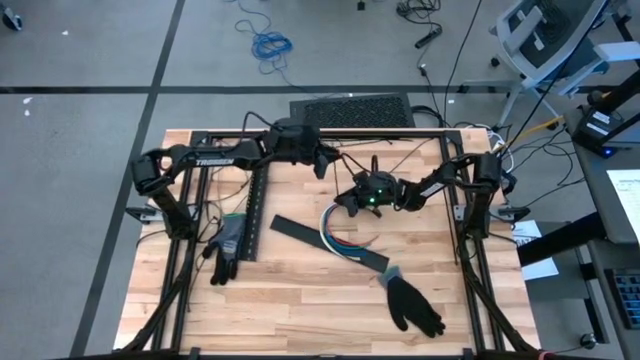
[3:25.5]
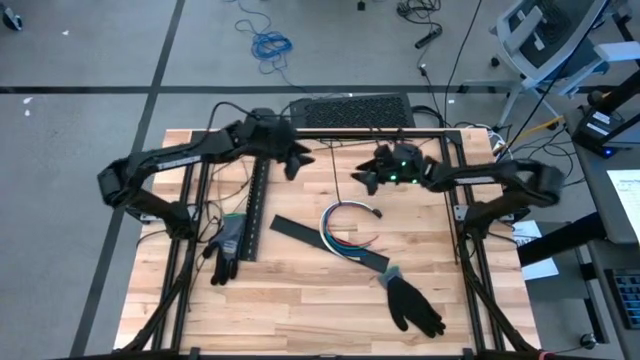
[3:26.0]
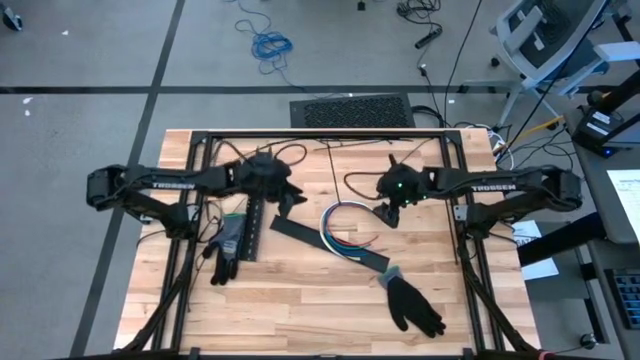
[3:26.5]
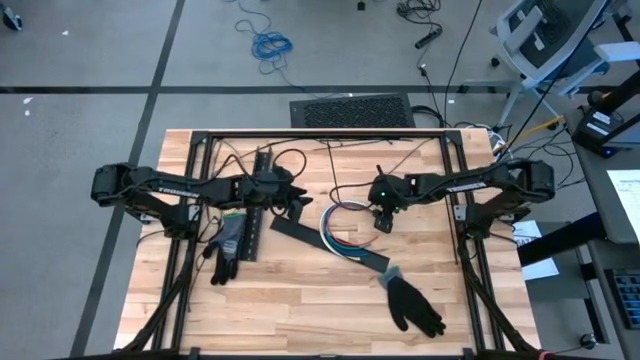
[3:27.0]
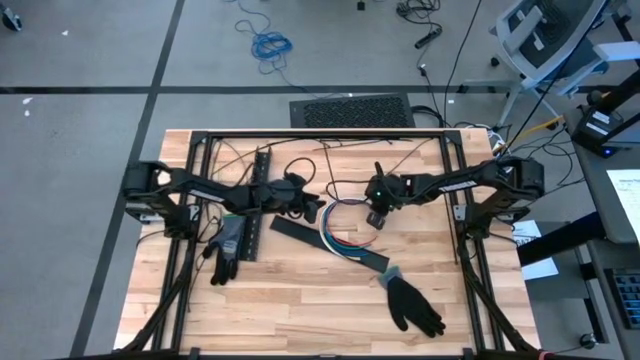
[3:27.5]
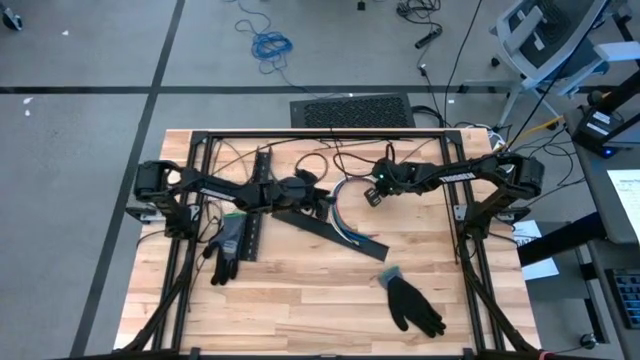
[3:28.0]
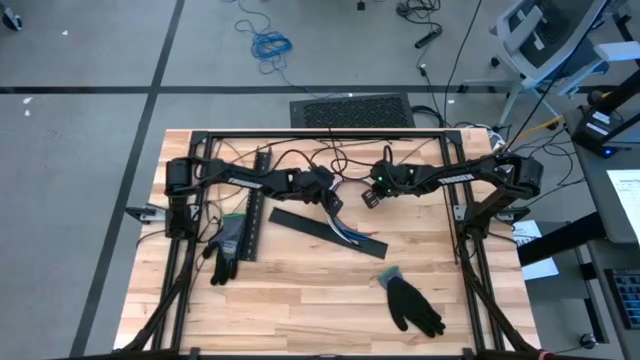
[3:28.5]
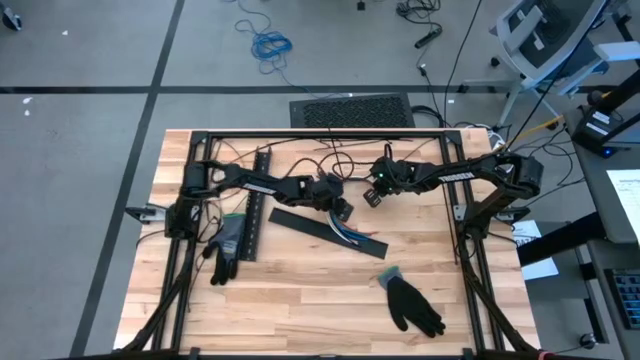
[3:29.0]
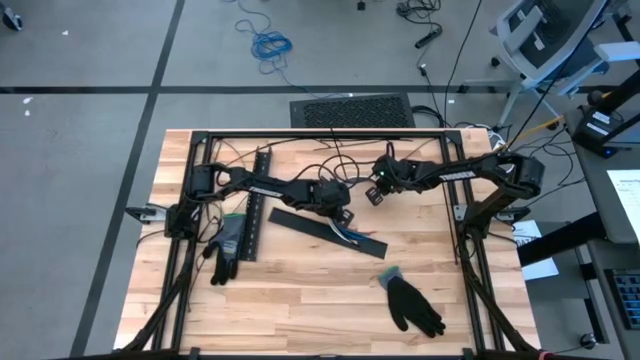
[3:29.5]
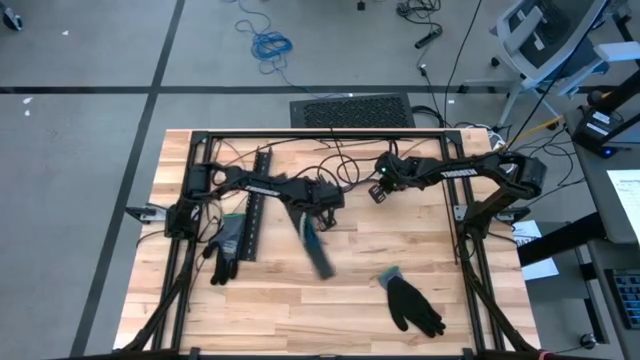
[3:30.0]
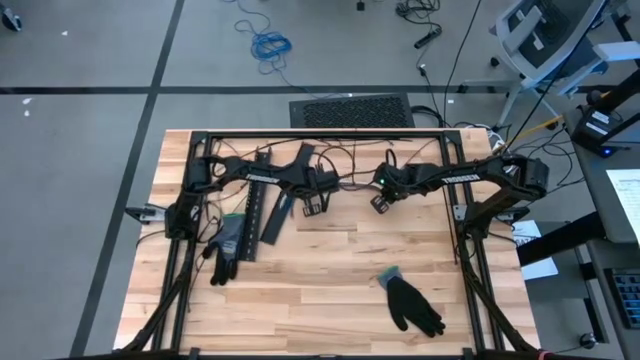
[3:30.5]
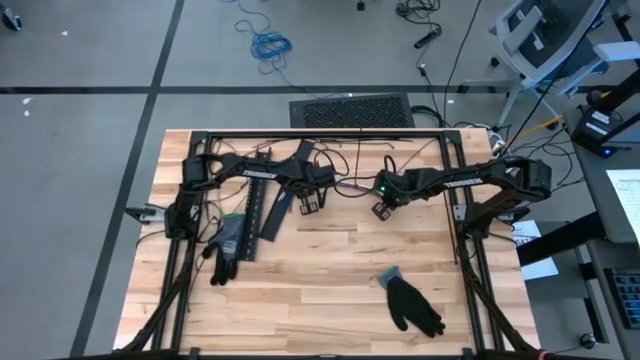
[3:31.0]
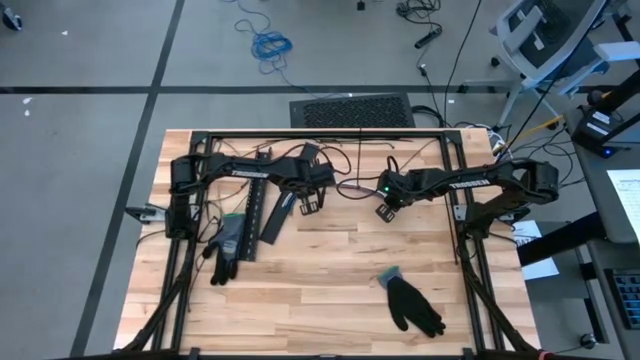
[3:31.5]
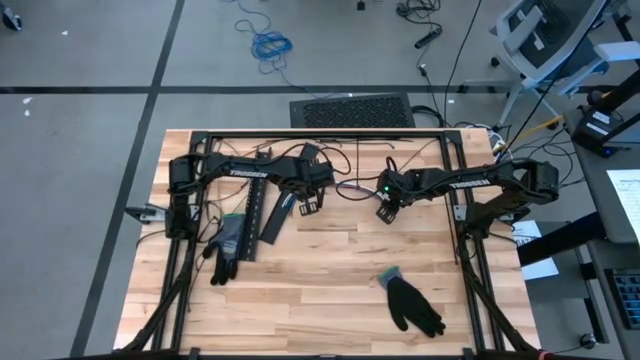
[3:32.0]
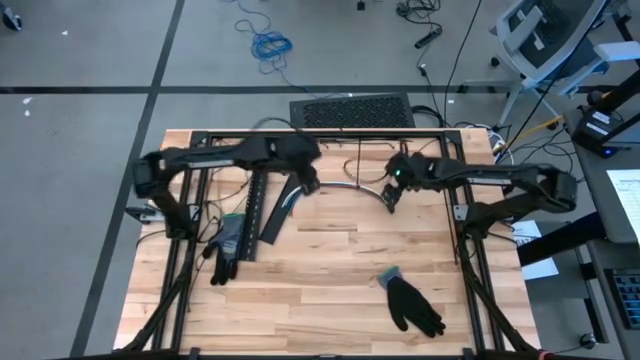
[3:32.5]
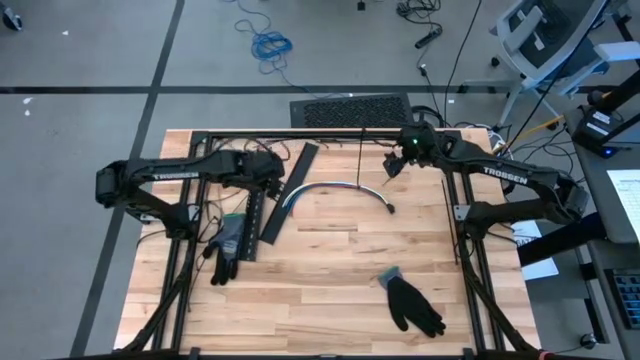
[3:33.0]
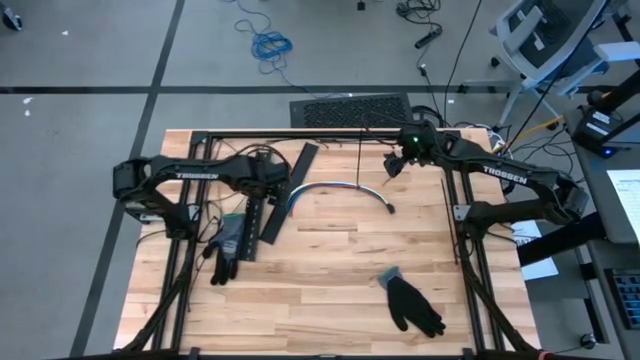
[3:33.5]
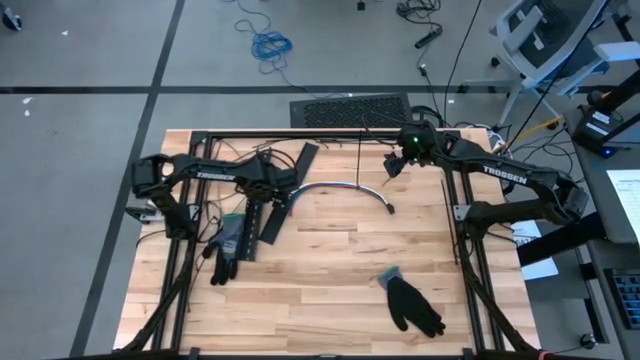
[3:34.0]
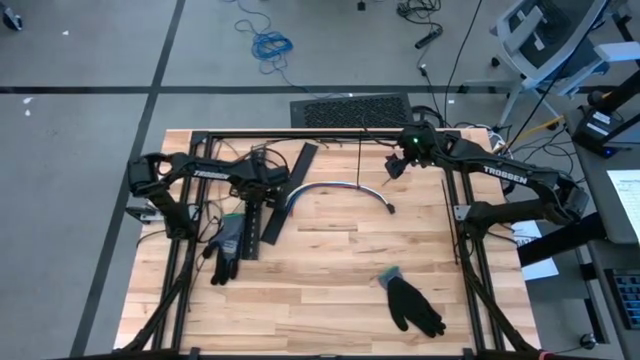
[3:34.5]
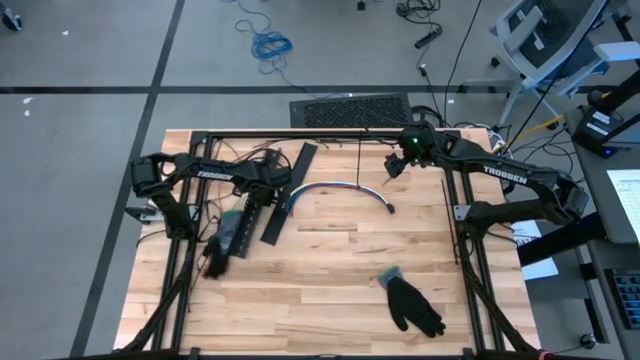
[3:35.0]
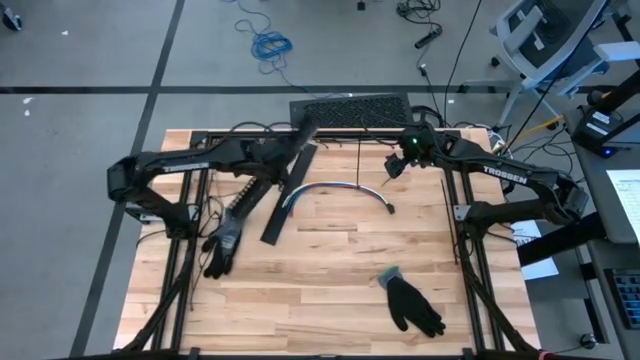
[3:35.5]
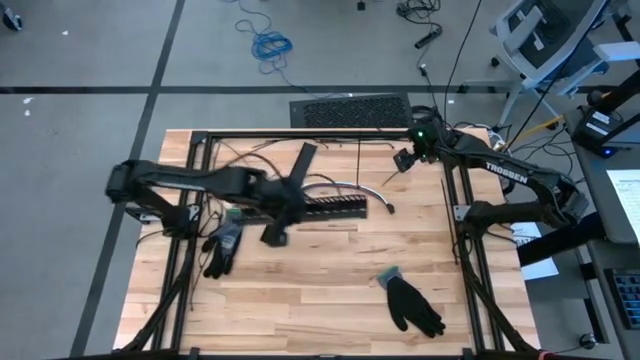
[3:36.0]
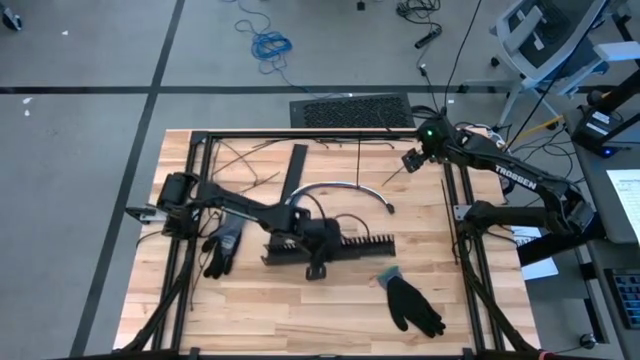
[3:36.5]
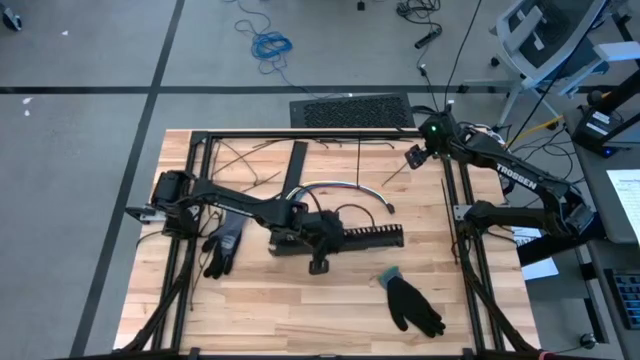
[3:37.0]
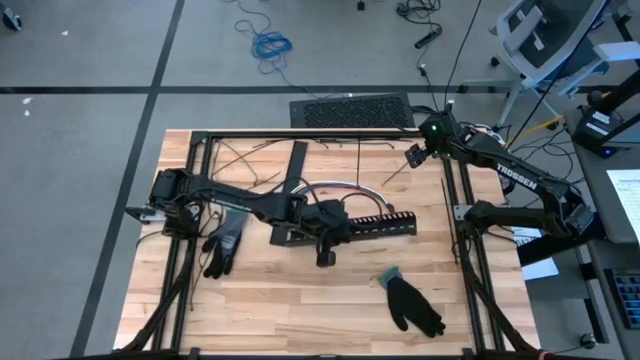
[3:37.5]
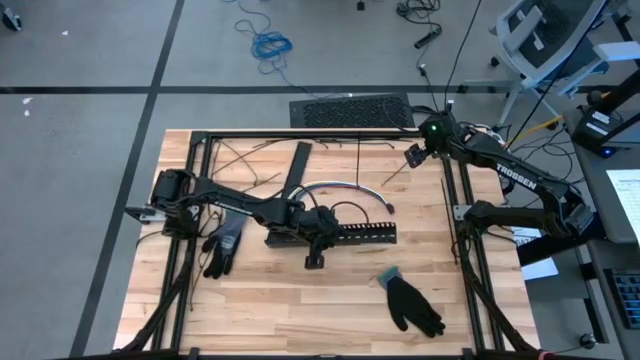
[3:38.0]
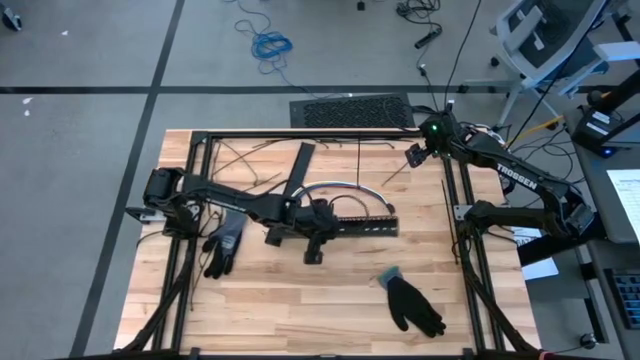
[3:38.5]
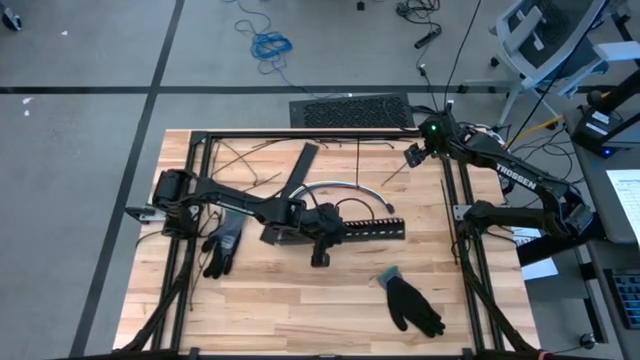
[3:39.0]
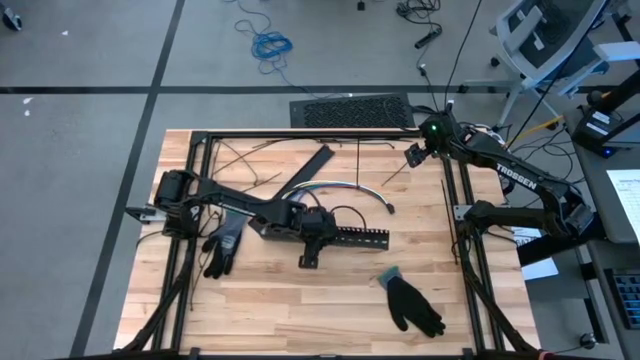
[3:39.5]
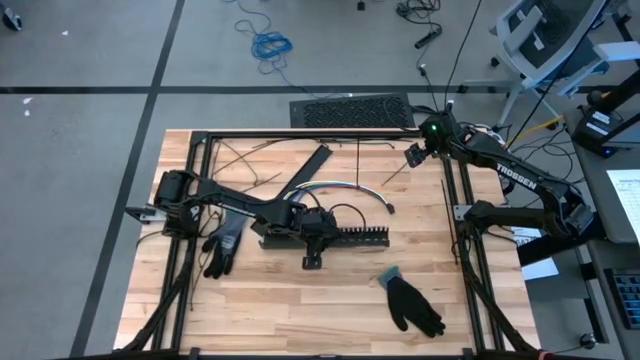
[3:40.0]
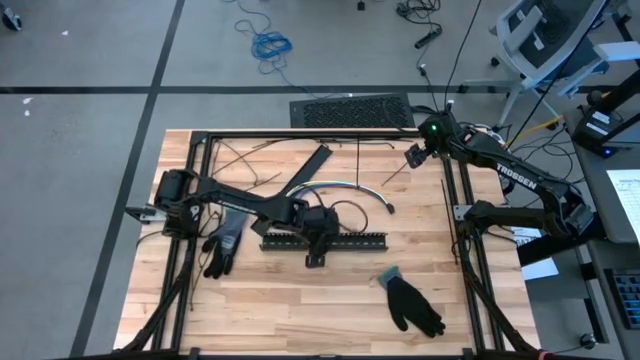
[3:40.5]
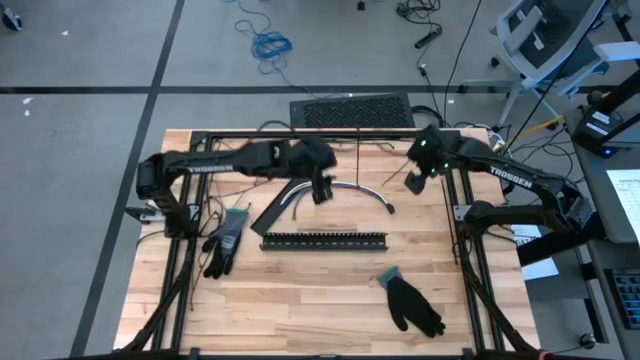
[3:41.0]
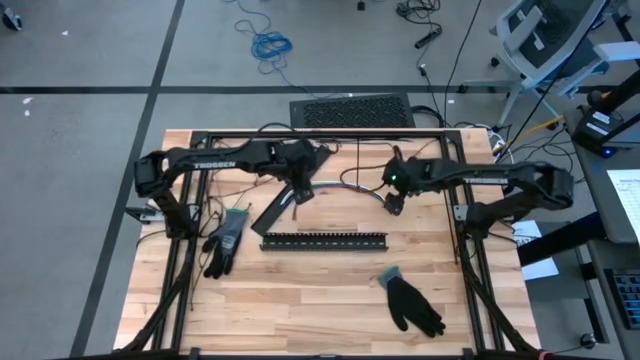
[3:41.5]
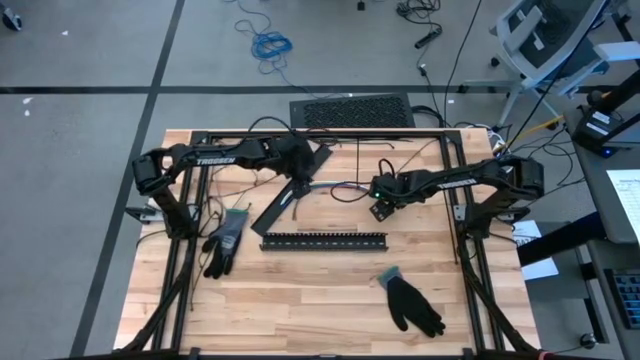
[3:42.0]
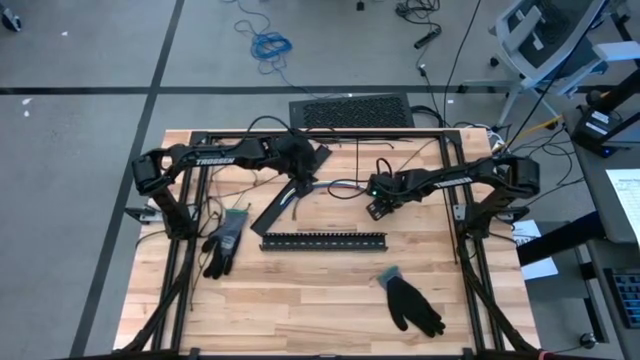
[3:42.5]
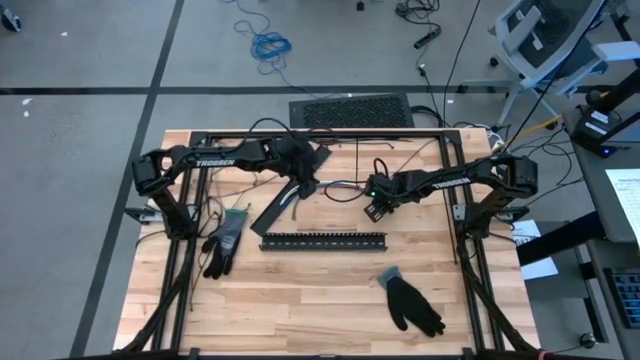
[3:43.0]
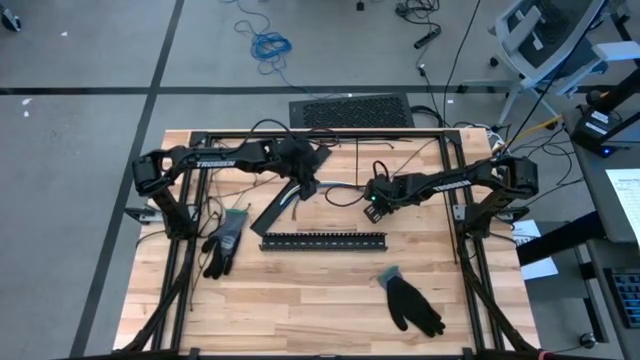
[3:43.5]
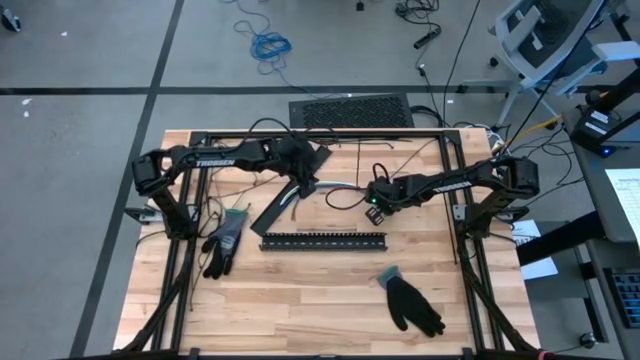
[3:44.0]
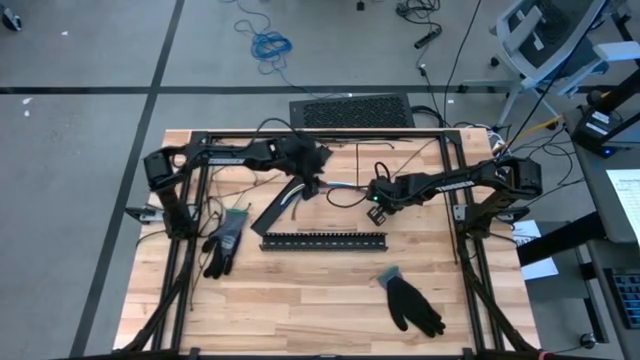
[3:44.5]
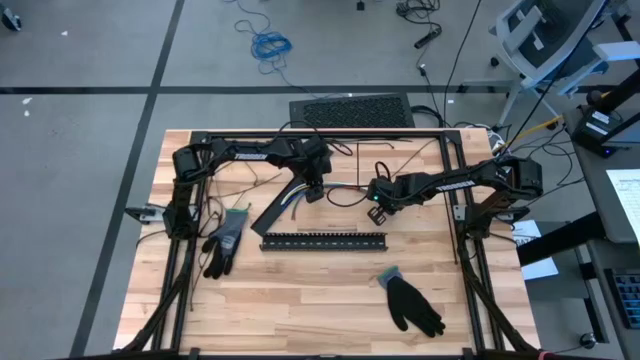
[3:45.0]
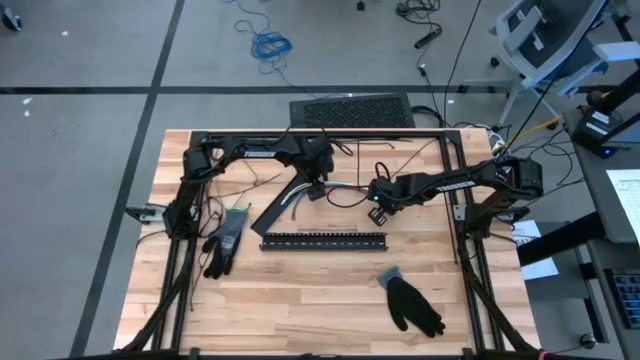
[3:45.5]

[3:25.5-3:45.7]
Task: Ziptie cables
Put the ziptied cable wires into the cable duct
